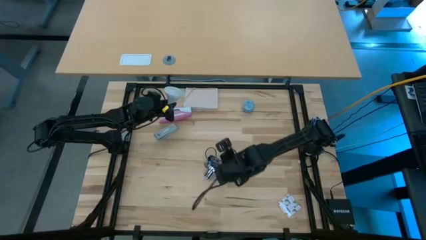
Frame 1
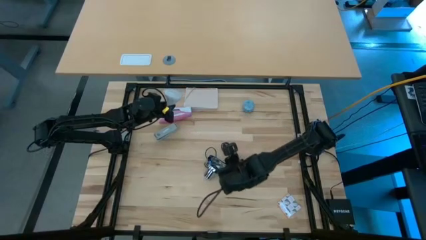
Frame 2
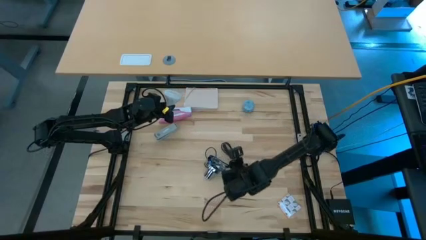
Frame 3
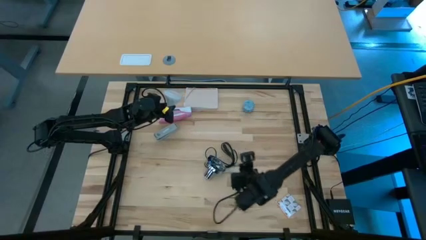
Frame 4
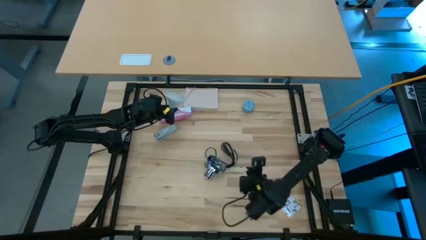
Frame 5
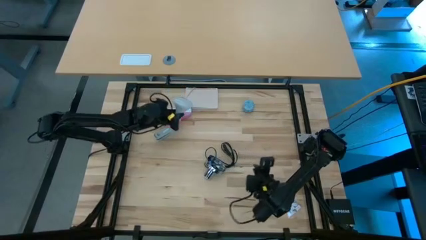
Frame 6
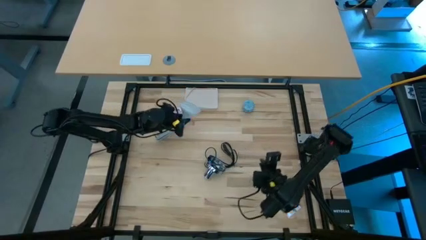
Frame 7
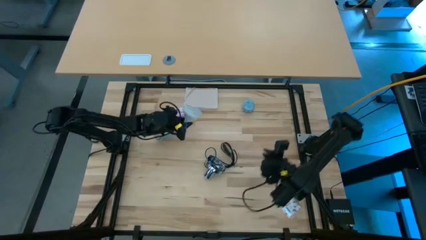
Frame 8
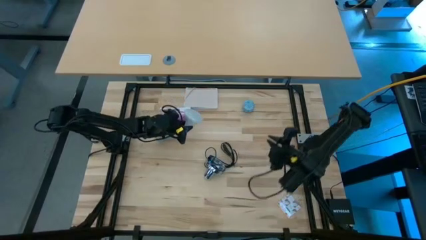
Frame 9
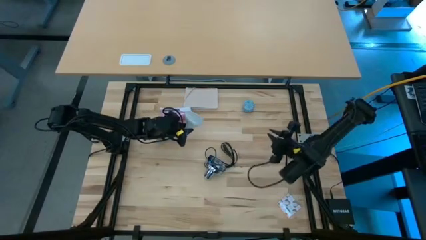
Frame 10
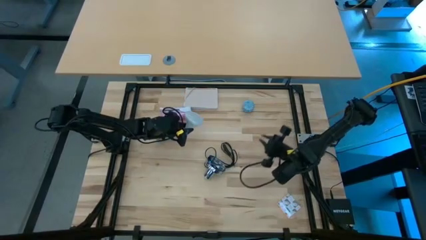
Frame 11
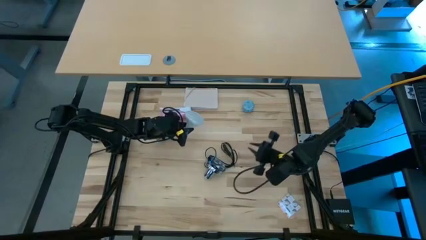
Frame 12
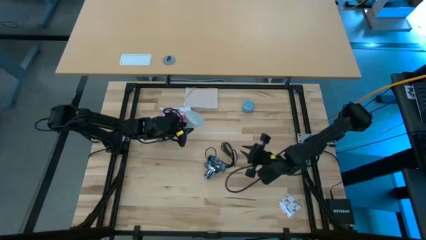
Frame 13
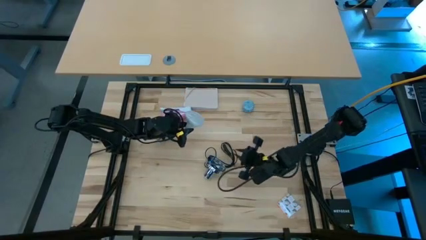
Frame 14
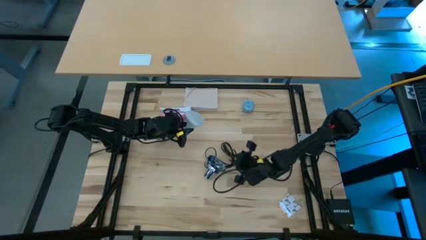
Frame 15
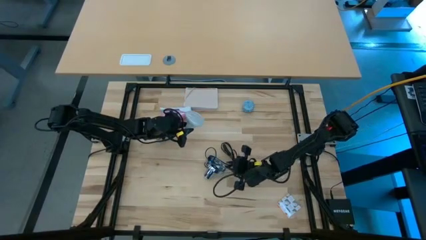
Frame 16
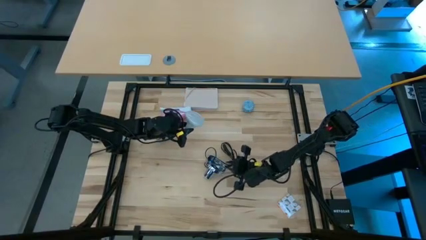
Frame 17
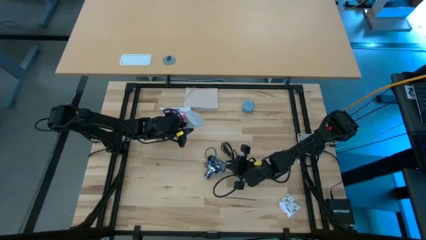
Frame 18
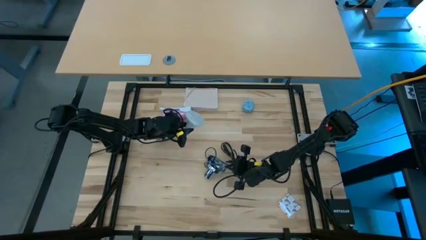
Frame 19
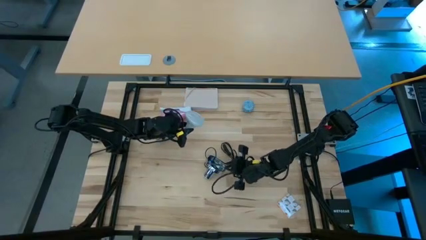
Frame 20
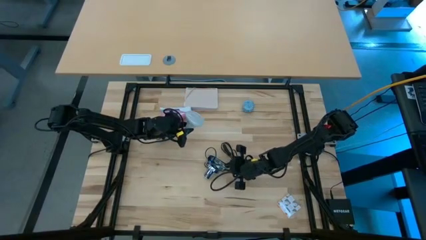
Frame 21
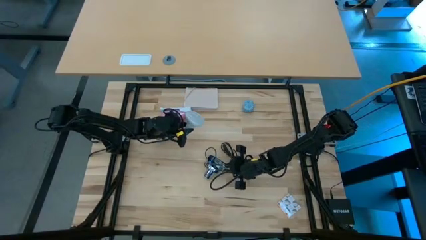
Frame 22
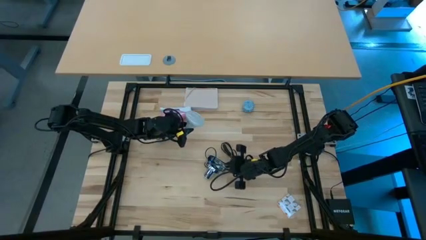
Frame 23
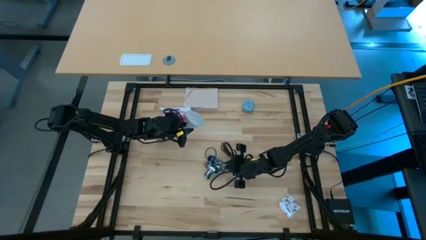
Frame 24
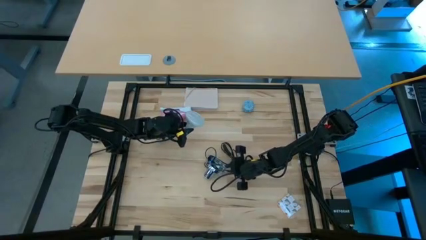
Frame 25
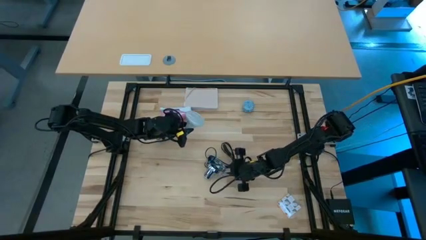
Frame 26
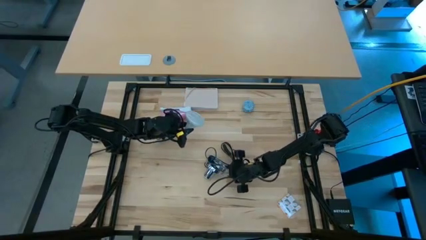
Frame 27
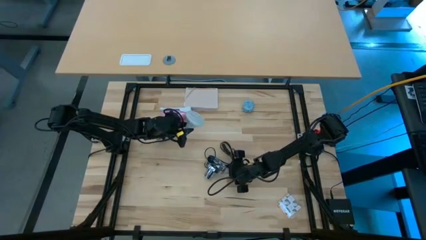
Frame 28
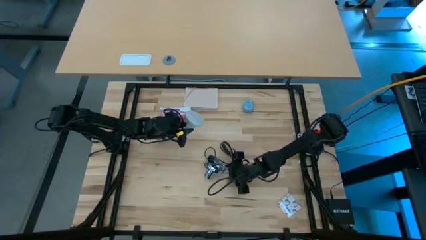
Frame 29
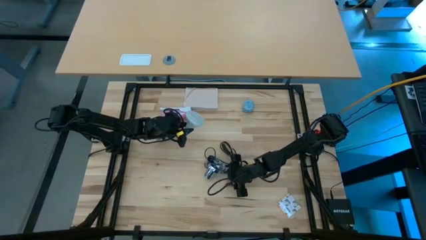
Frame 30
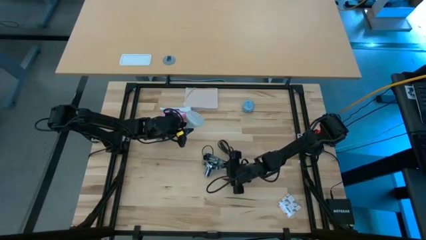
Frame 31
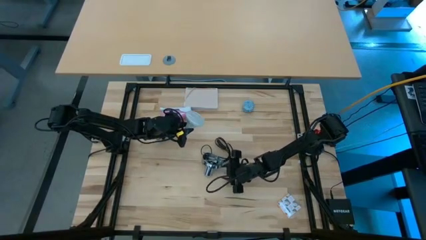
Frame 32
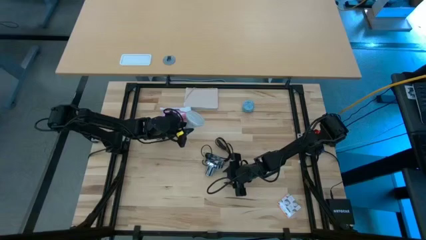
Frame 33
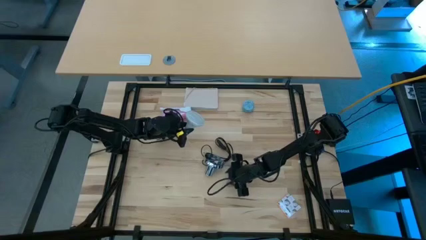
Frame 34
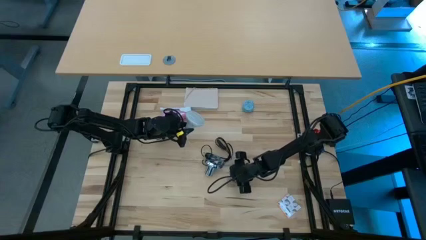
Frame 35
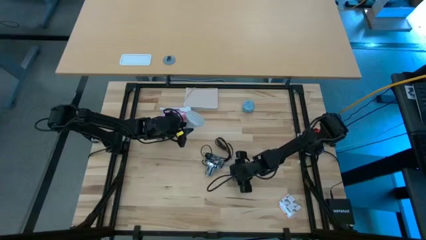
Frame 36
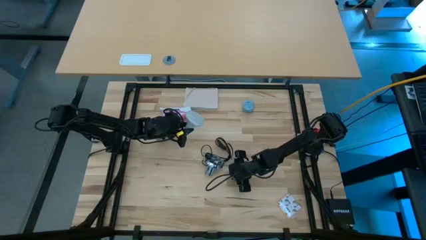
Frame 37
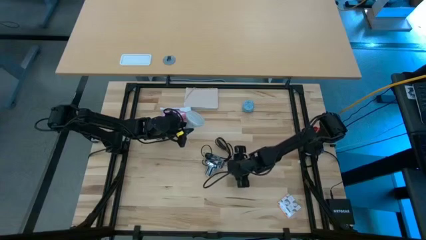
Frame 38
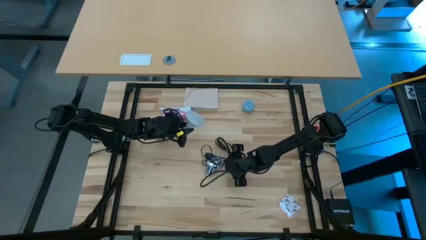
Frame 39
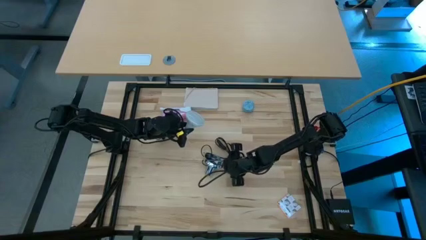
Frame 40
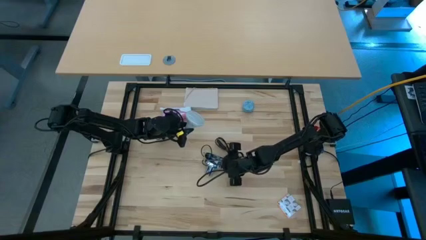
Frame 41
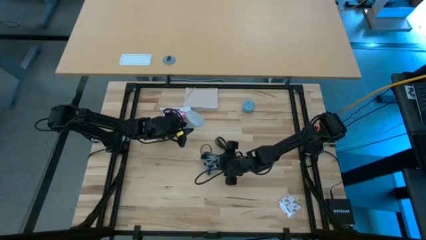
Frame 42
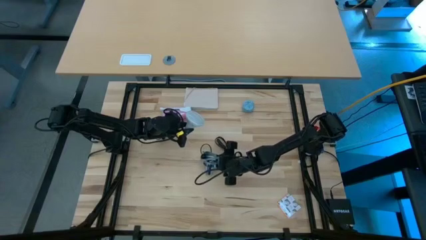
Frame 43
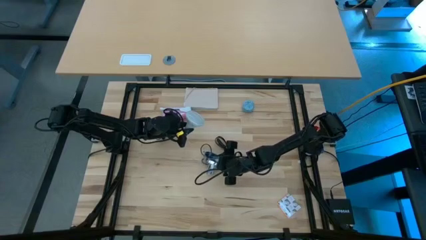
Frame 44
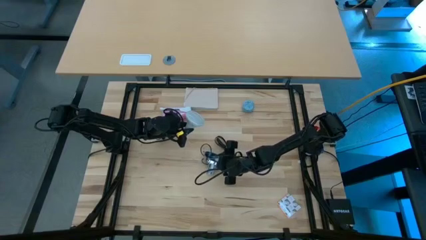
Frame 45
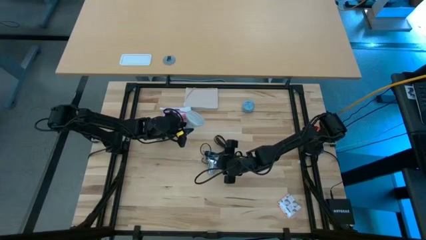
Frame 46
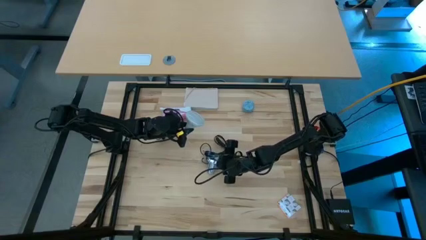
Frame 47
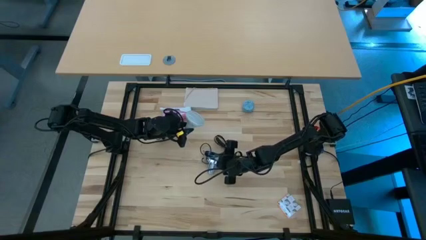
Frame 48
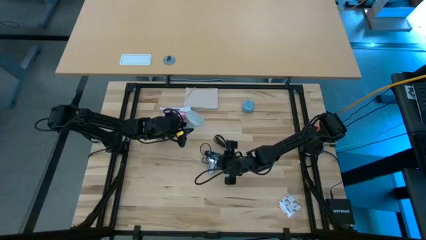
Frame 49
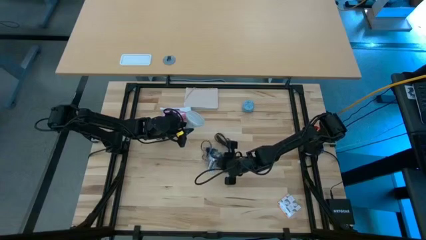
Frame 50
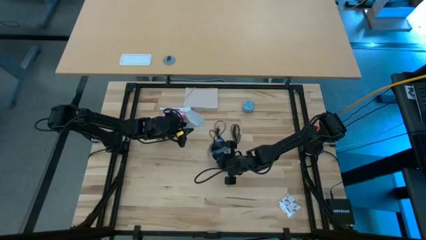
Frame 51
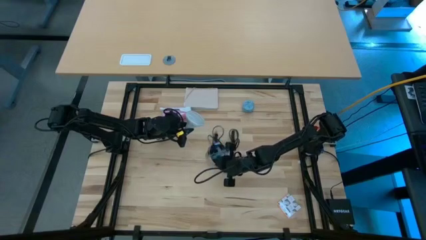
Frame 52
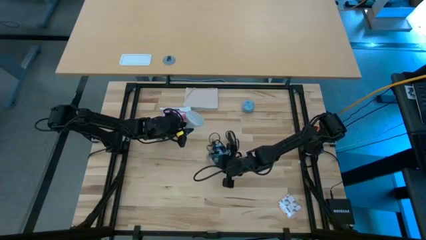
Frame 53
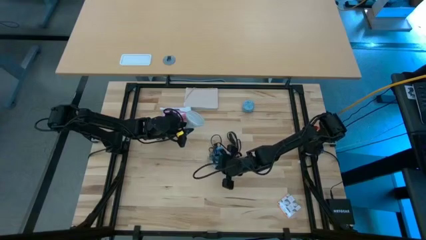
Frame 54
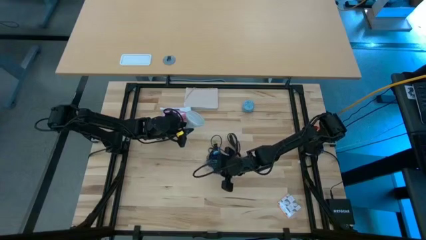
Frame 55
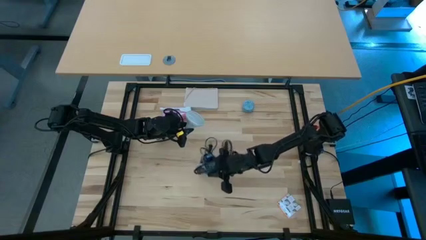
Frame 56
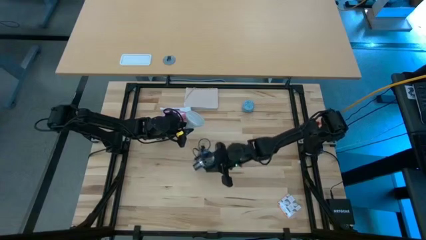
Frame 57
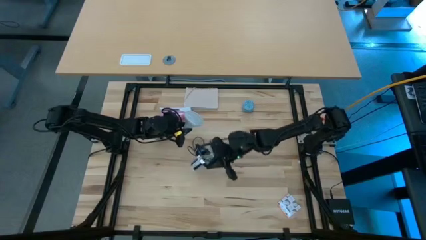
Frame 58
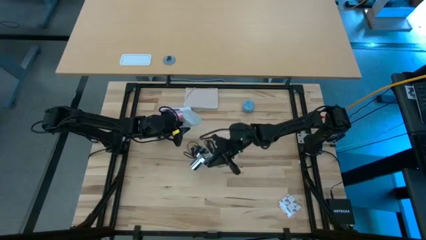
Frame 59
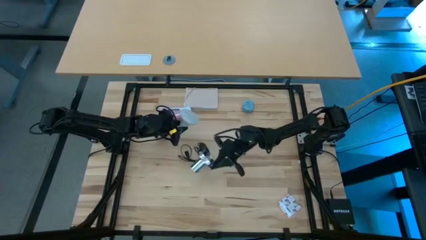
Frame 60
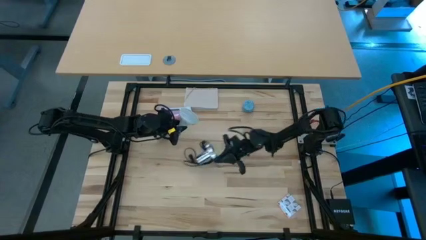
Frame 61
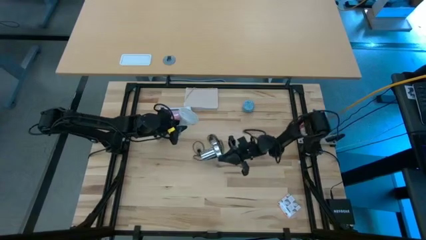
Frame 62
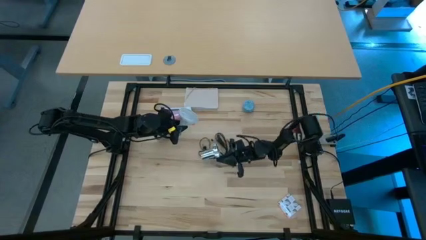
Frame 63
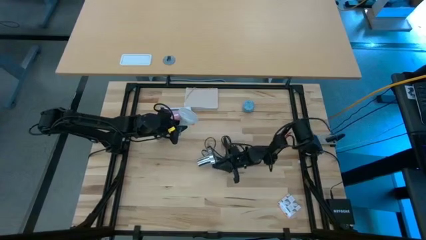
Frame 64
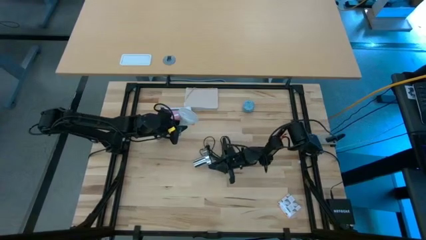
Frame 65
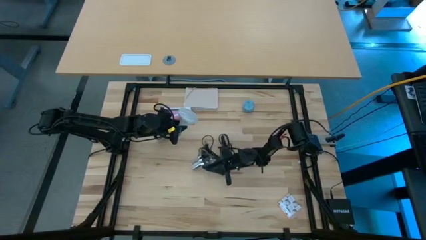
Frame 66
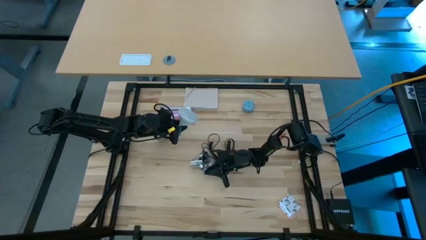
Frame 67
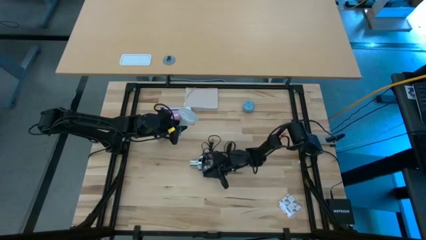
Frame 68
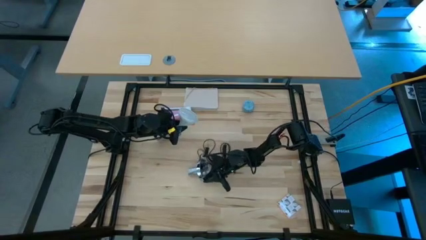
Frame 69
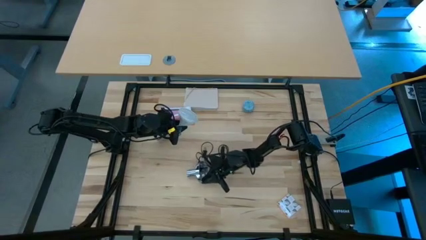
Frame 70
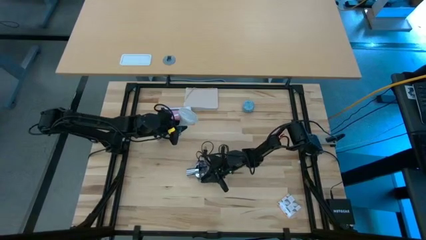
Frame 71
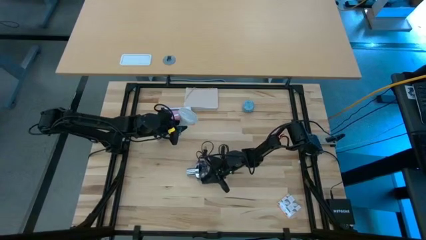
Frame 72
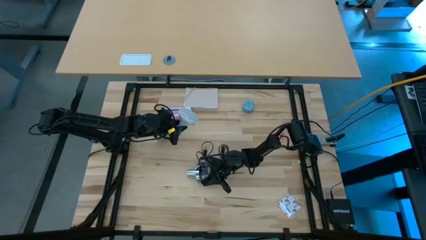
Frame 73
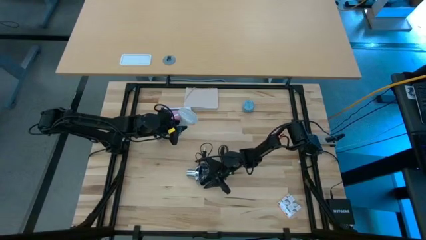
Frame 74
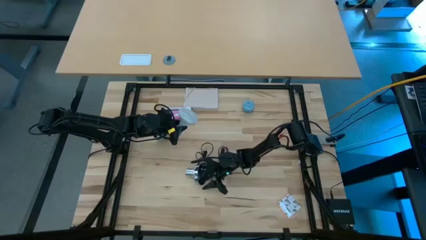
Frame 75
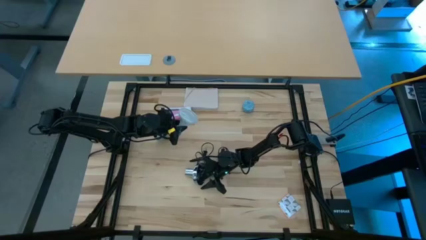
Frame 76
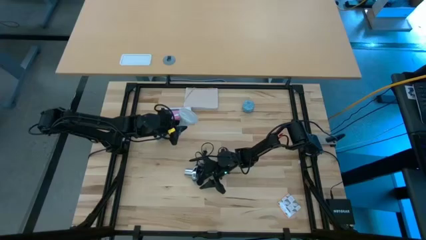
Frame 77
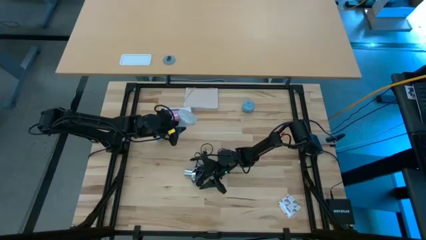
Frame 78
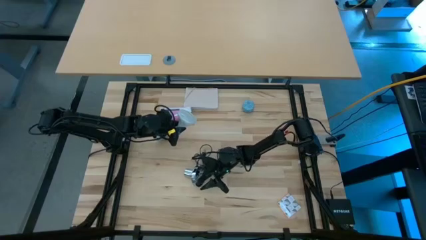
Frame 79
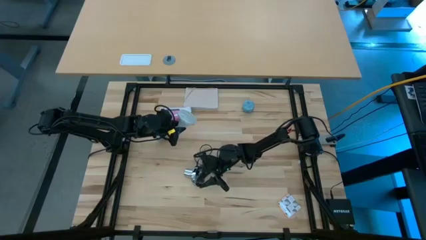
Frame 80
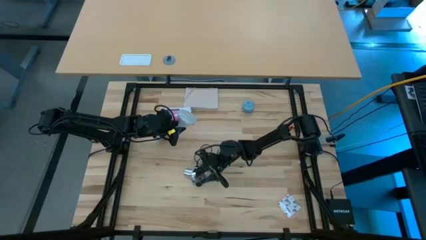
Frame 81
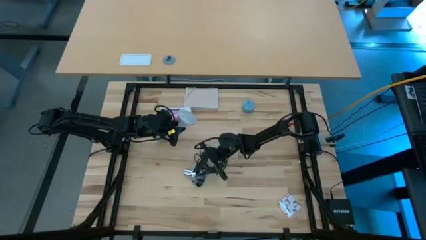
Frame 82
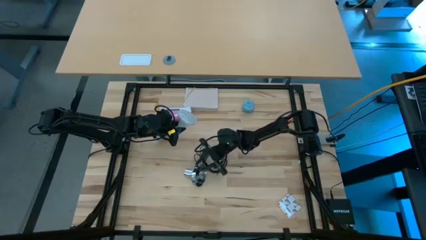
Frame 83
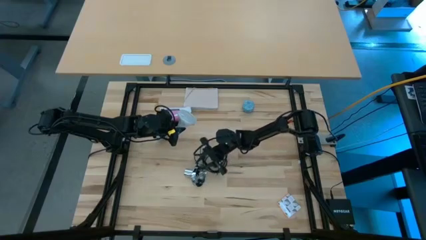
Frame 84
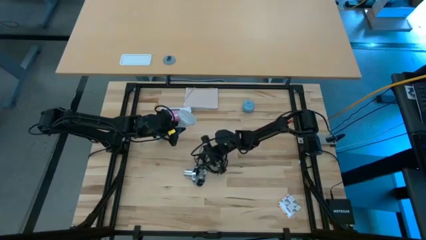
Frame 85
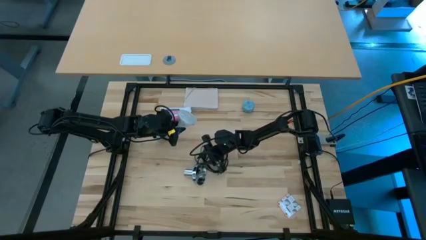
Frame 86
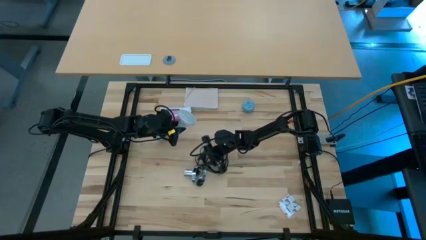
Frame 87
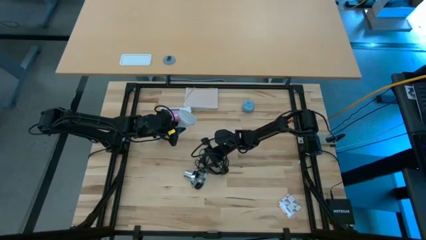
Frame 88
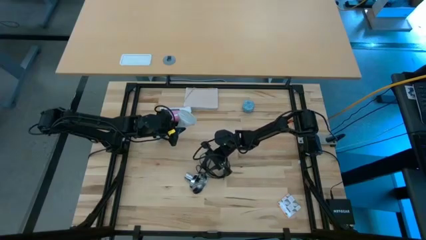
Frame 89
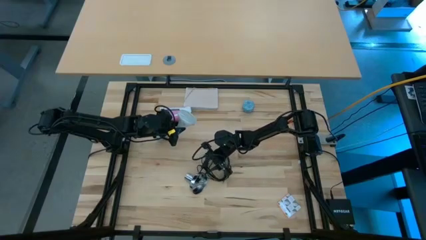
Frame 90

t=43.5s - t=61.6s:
Task: Screw lightbulb
Insert the white lightbulb into the desk lamp
